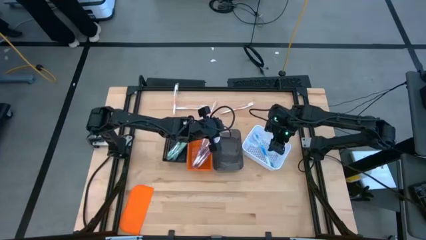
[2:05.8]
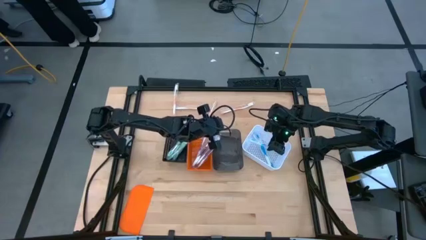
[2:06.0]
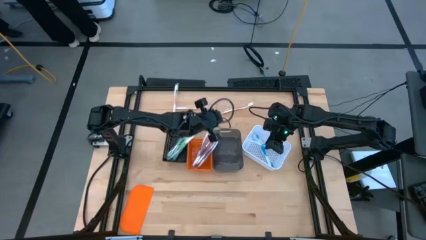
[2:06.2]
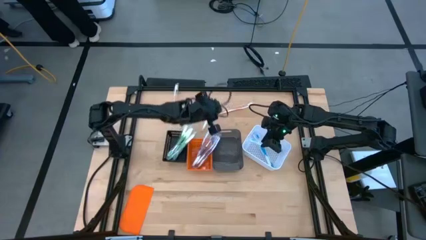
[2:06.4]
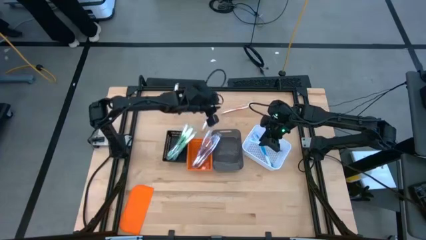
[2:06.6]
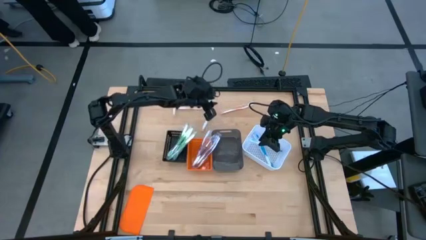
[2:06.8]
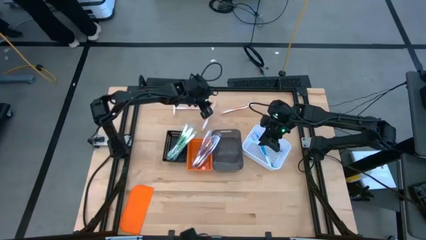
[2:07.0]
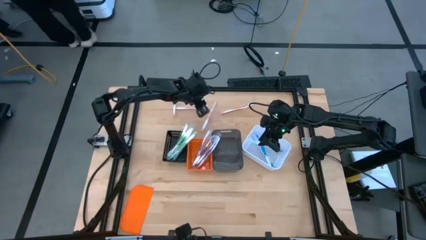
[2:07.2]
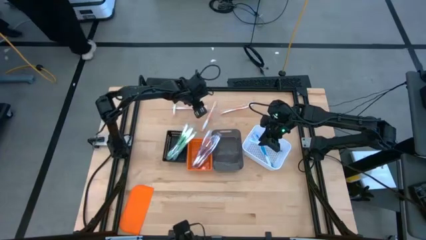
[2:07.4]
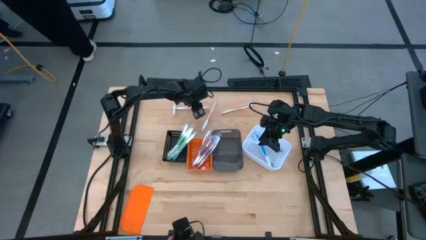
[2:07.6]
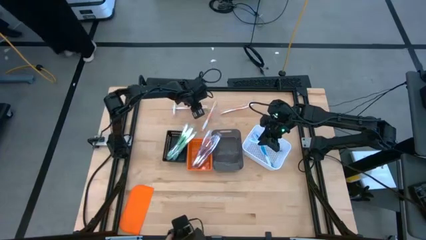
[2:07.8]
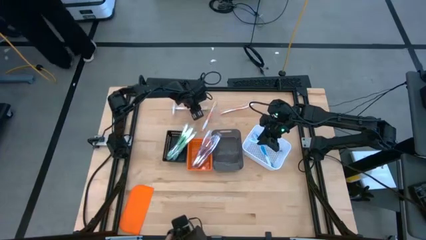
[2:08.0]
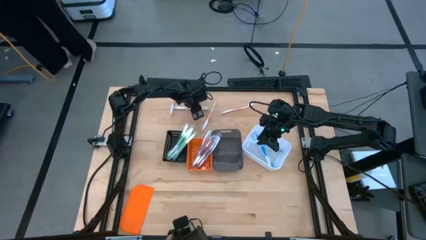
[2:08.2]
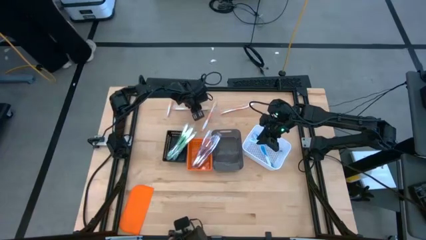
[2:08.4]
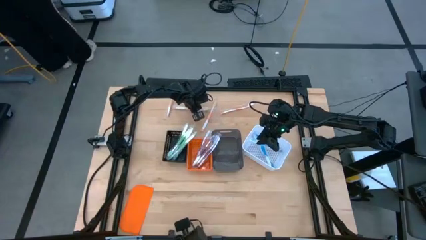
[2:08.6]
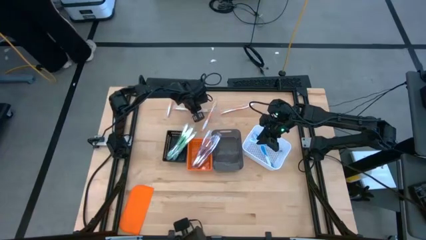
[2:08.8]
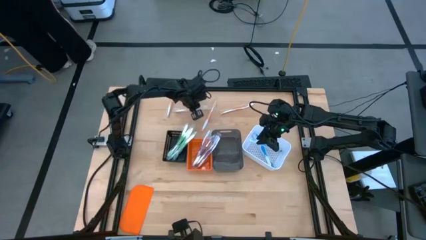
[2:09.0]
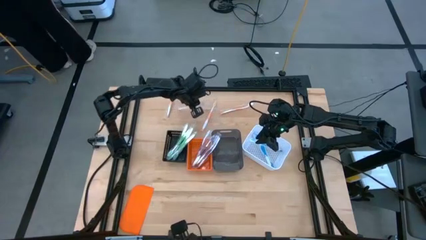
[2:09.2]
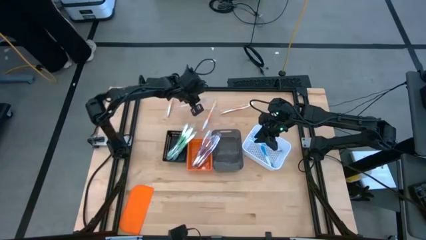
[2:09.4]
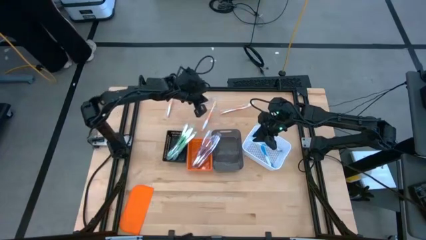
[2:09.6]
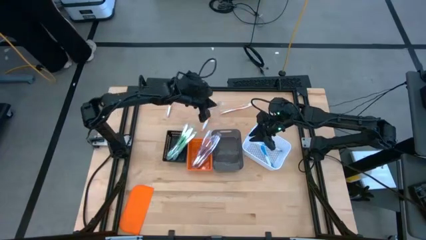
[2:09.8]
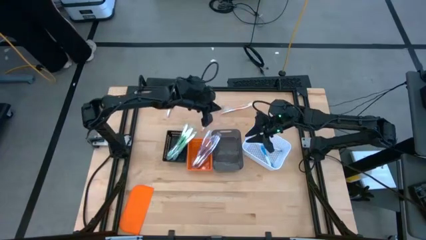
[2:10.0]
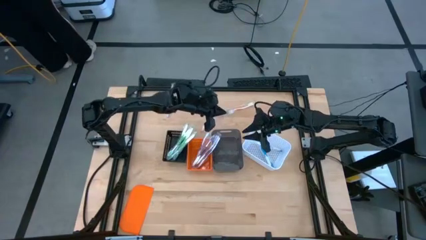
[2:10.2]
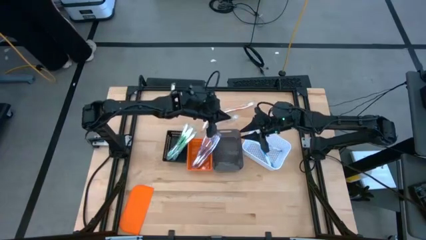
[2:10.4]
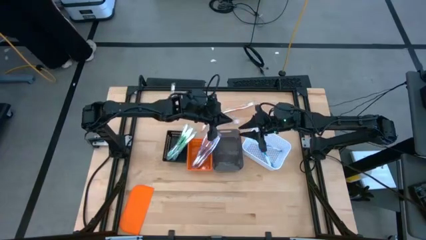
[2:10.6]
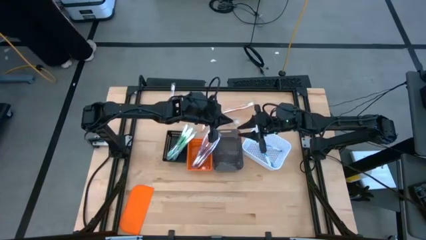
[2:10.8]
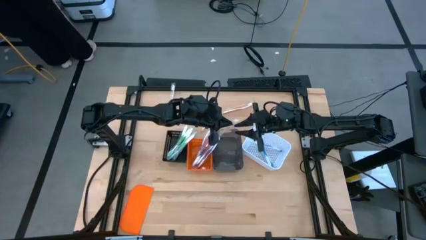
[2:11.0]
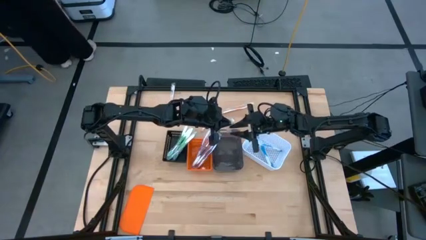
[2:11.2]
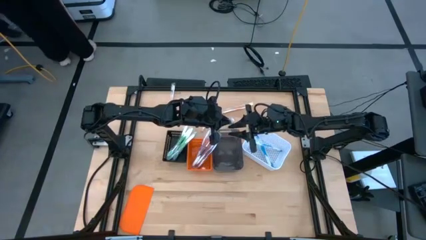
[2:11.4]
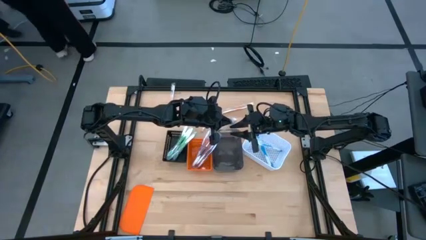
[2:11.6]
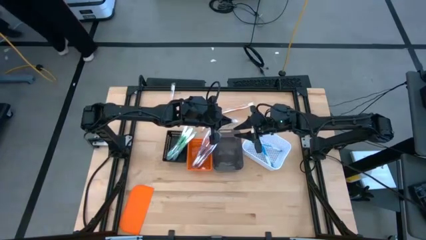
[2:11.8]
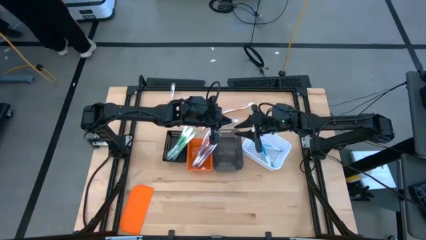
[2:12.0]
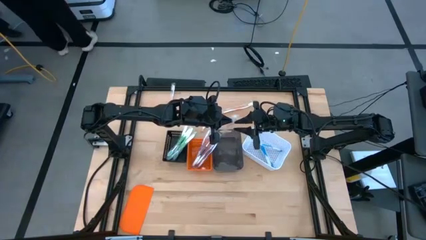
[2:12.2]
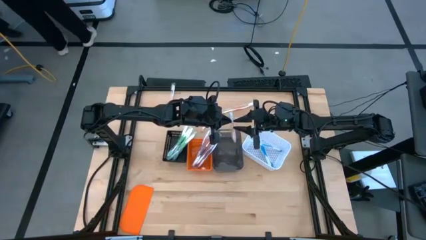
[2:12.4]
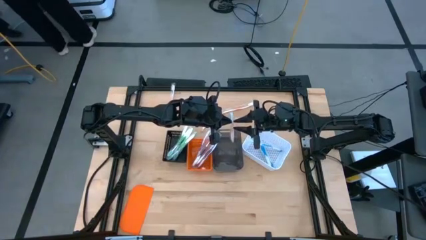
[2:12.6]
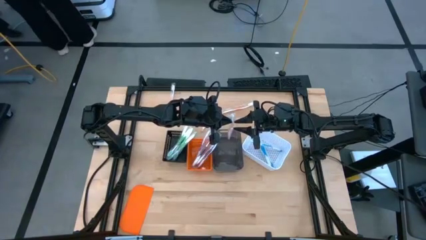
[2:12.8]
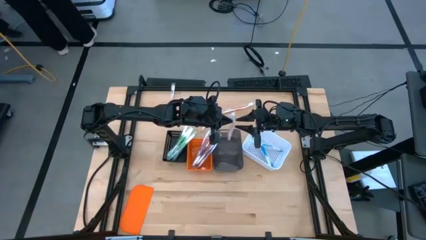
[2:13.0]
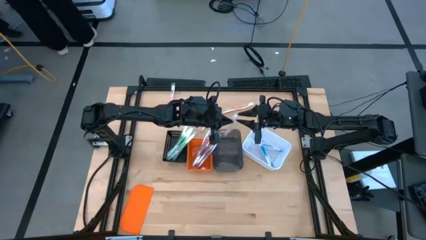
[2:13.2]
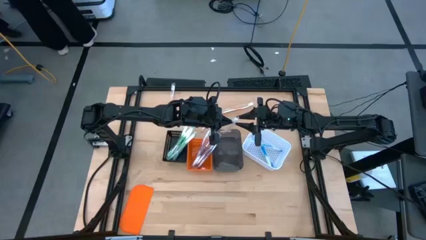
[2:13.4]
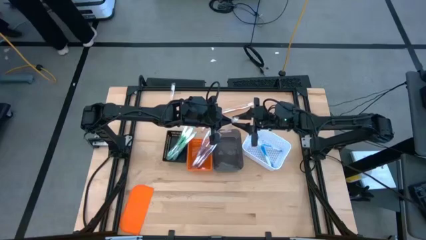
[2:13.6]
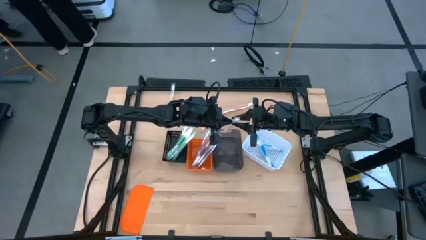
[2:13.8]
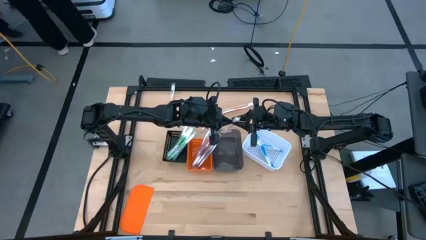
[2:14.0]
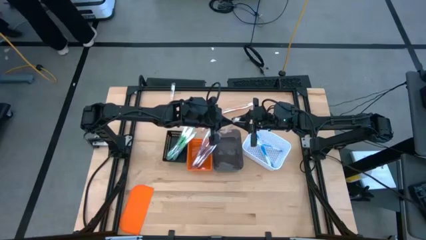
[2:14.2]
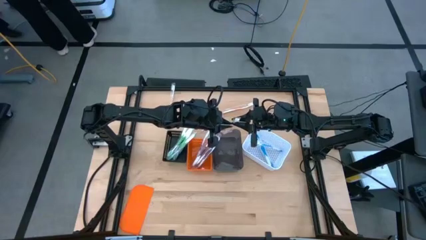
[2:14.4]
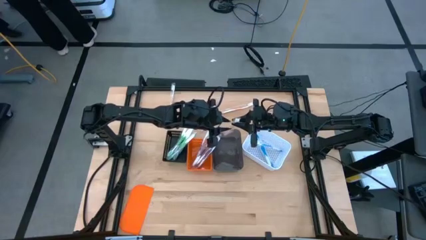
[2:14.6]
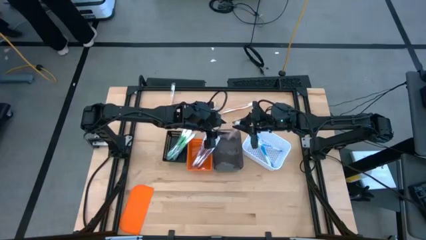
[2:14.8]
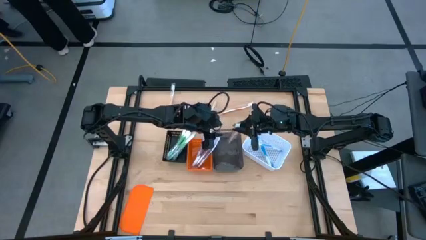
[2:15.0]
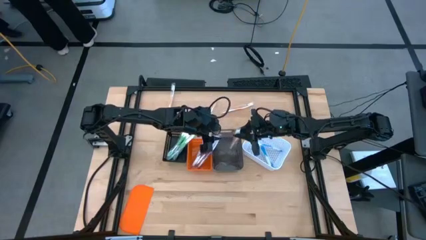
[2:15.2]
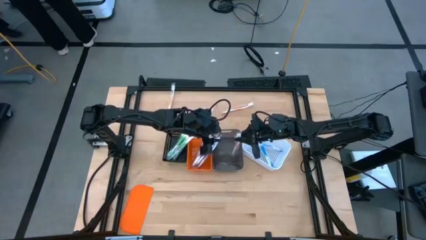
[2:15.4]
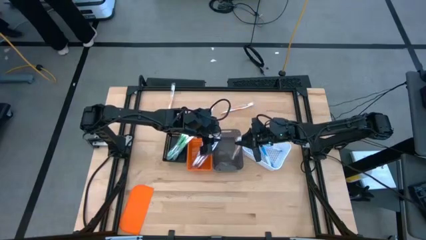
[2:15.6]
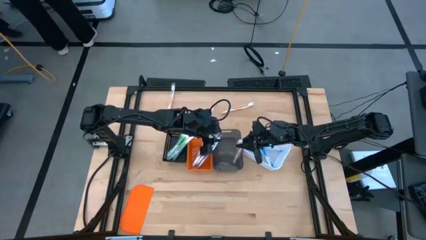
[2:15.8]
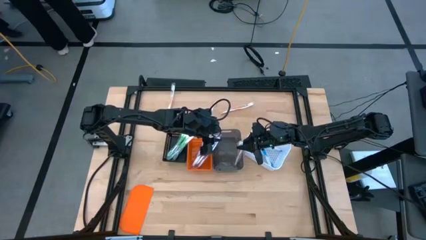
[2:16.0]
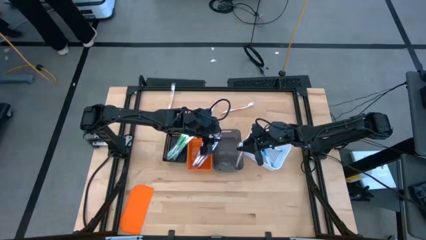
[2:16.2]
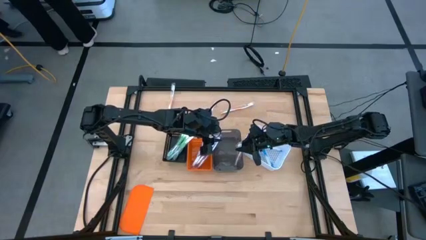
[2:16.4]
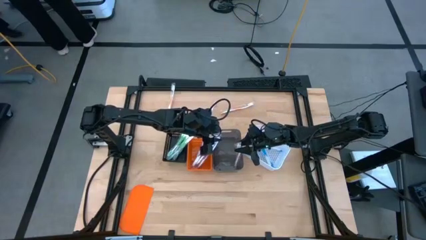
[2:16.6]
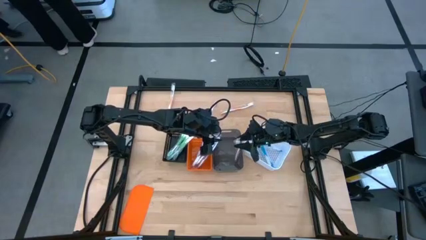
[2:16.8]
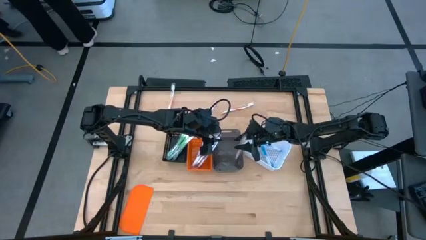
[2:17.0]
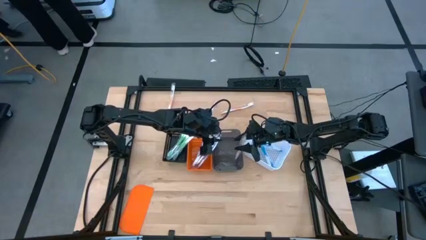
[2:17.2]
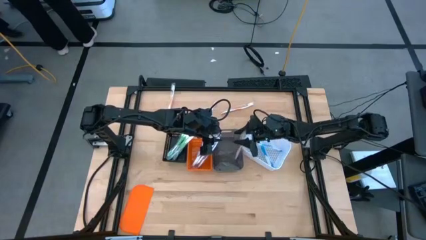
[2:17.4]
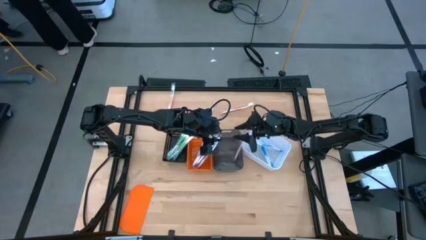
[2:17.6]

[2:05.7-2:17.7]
Task: Pick & Place Toothbrushes
Put the orange toothbrush into the black transparent bin

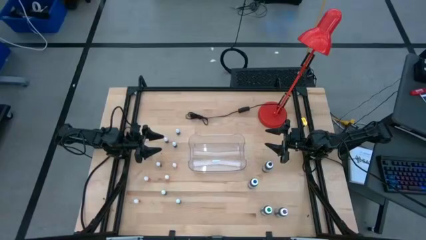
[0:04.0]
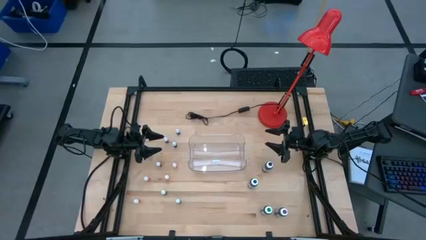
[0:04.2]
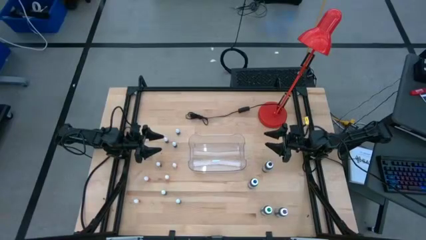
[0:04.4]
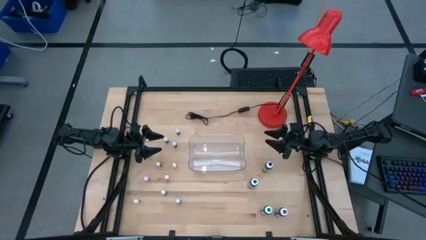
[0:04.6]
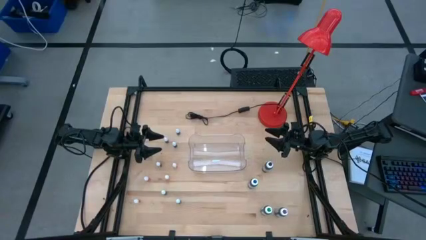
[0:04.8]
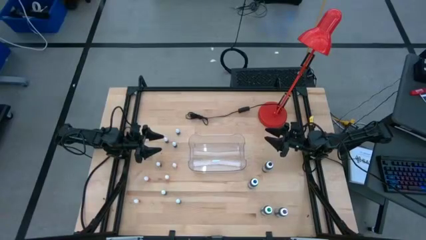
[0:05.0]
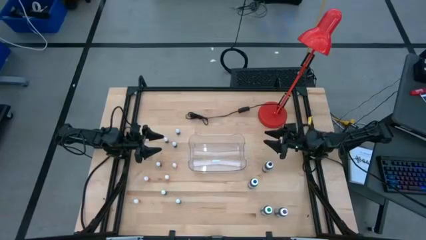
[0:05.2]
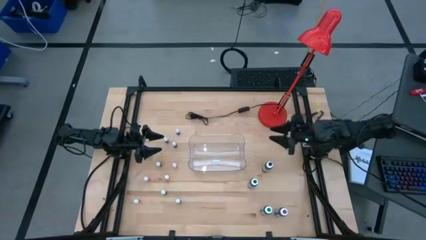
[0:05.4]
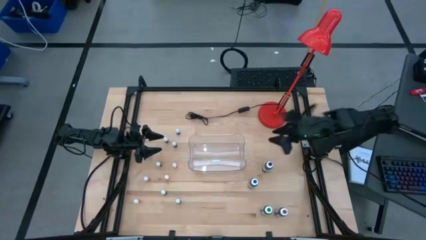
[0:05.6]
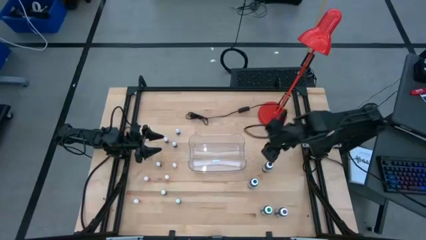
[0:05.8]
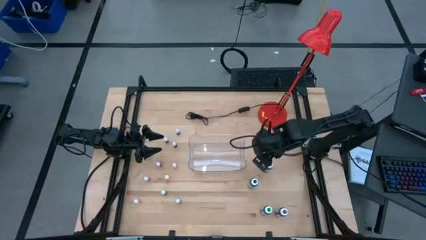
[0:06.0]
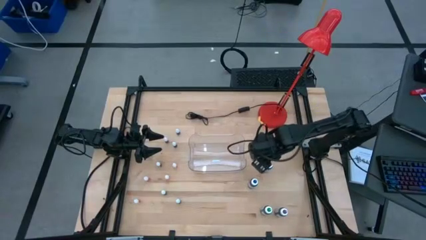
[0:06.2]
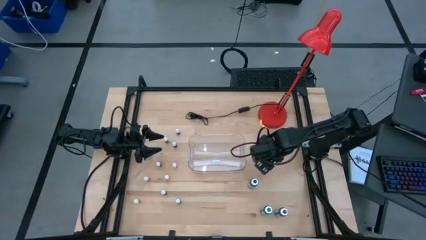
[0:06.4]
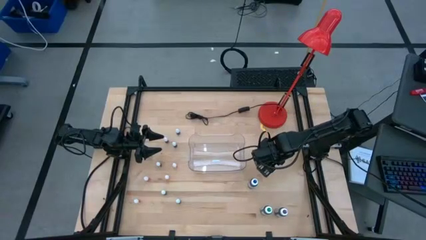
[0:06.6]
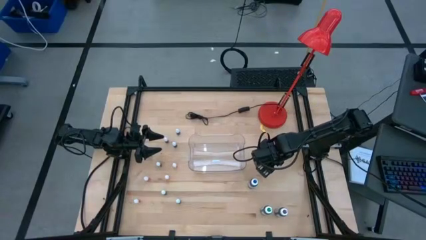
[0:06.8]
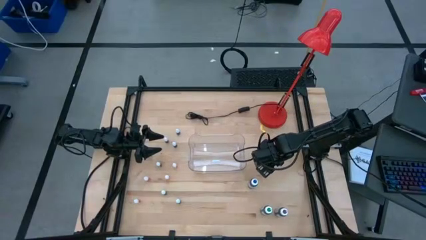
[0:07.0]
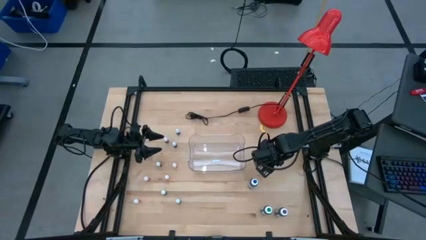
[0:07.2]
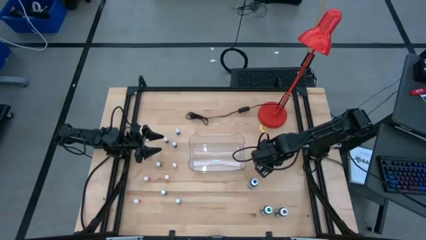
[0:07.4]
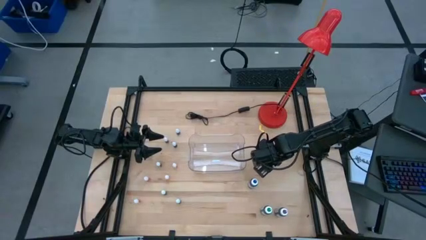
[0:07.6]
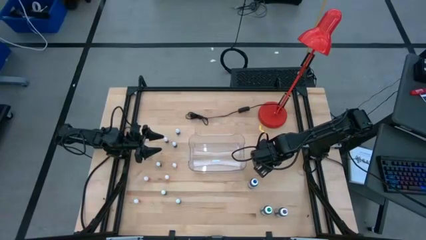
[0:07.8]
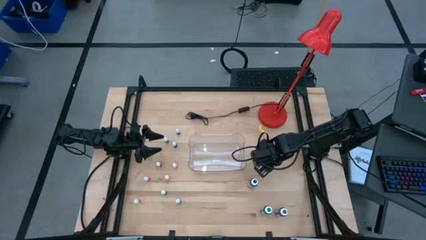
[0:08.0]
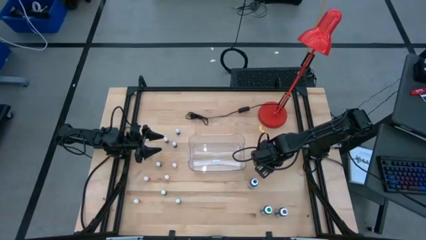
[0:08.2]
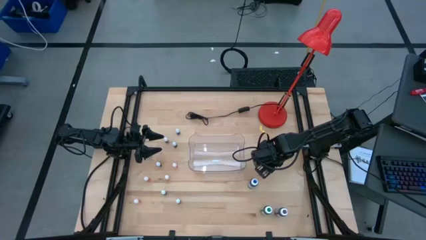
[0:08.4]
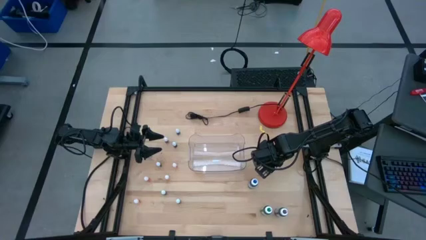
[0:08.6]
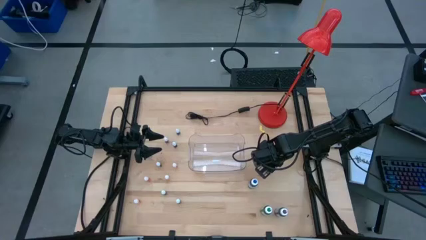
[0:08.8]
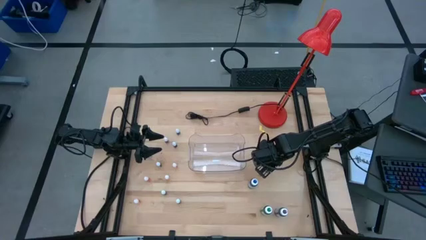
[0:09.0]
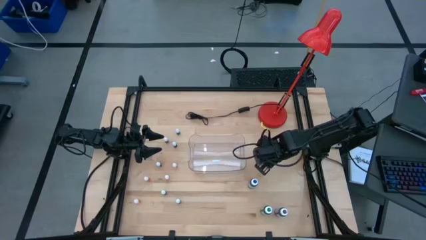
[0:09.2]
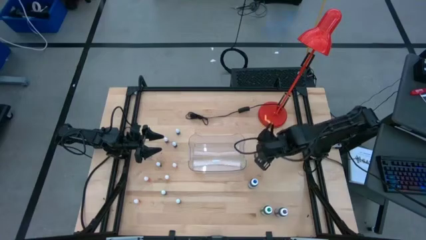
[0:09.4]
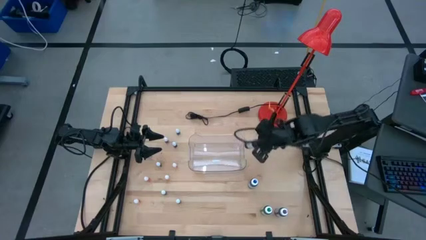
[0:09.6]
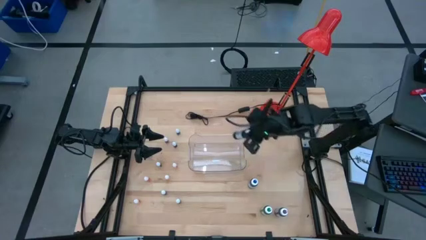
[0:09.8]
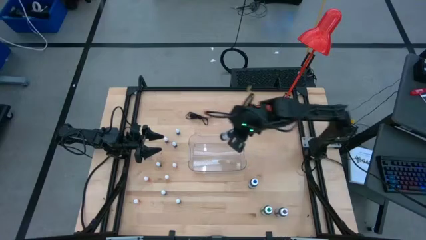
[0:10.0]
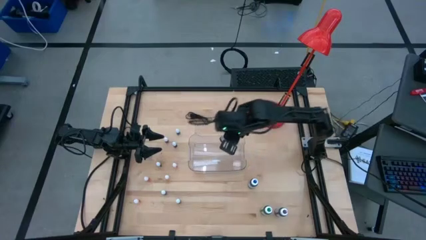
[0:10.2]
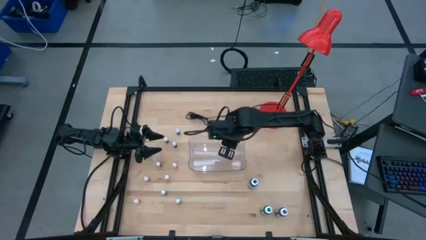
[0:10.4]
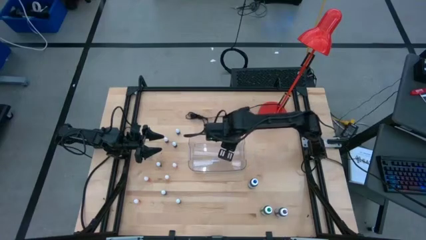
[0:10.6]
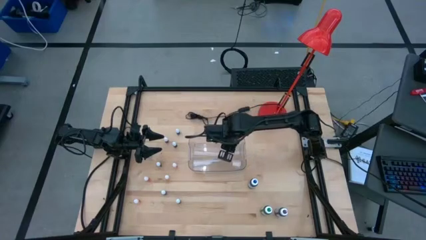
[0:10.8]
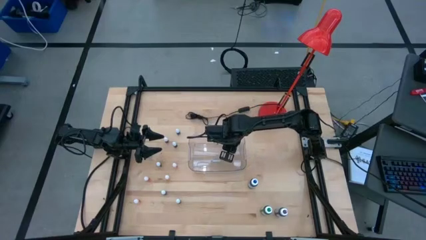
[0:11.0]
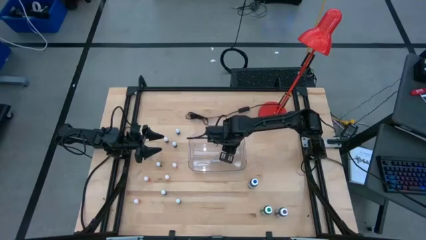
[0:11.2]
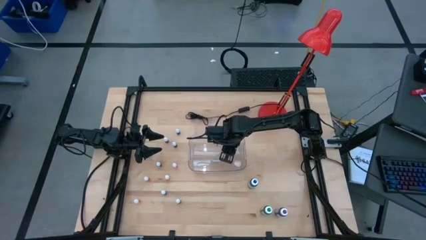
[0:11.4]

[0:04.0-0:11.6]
Task: Pick & Place food coloring
Put the large black food coloring bottle into the transparent bin
